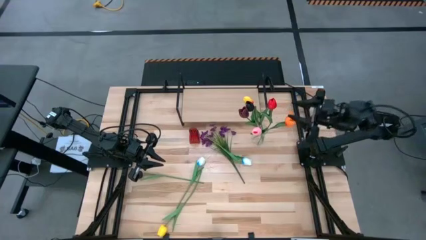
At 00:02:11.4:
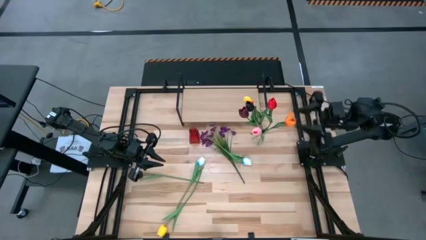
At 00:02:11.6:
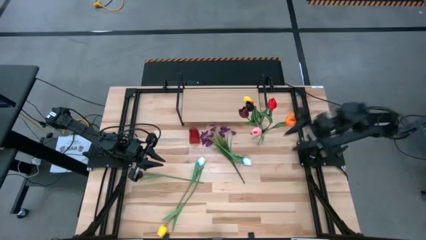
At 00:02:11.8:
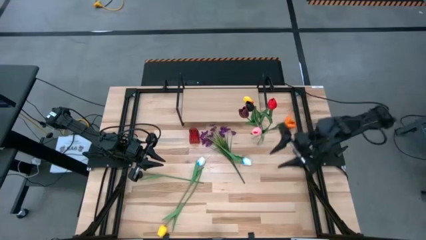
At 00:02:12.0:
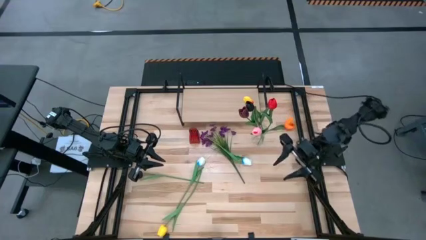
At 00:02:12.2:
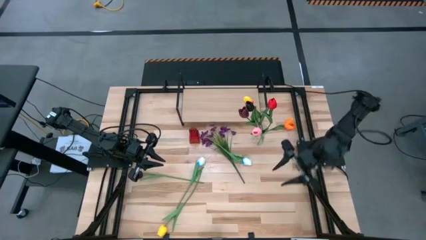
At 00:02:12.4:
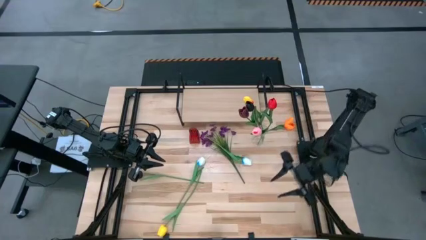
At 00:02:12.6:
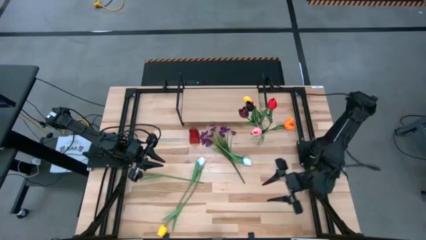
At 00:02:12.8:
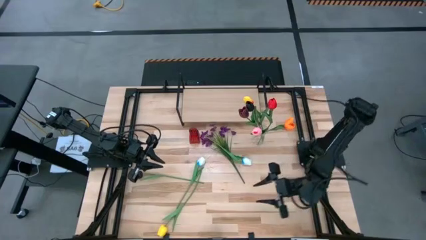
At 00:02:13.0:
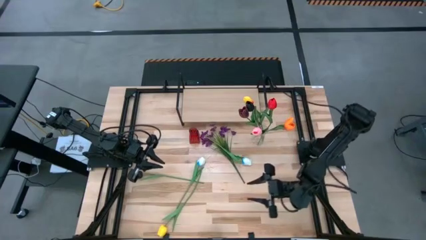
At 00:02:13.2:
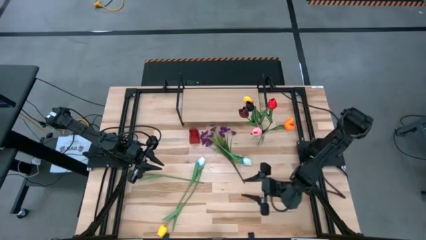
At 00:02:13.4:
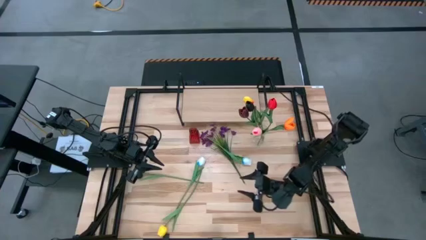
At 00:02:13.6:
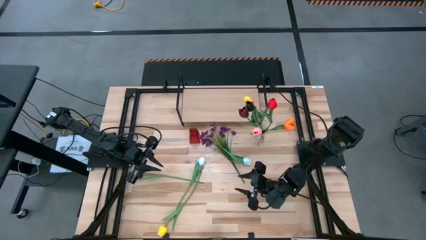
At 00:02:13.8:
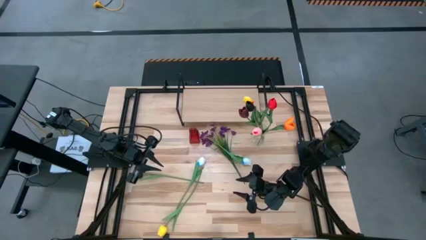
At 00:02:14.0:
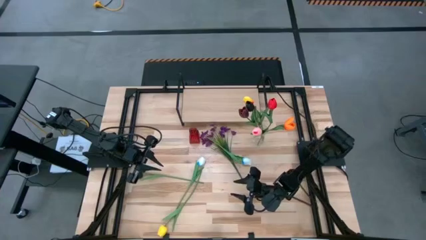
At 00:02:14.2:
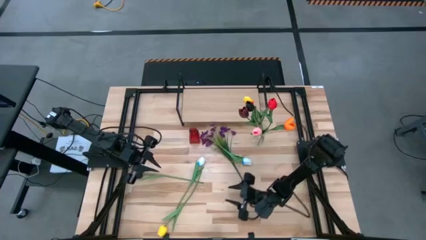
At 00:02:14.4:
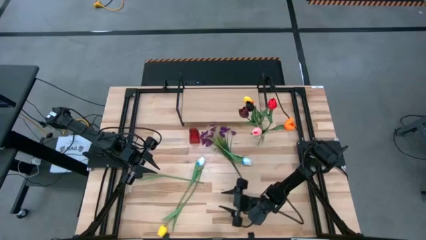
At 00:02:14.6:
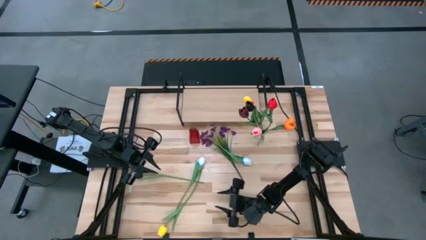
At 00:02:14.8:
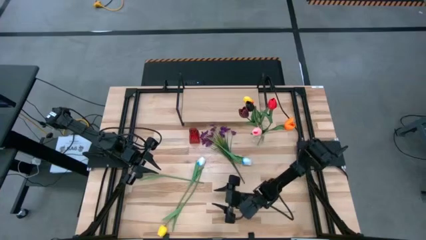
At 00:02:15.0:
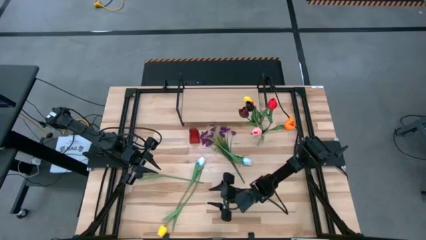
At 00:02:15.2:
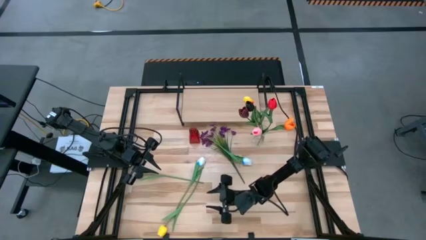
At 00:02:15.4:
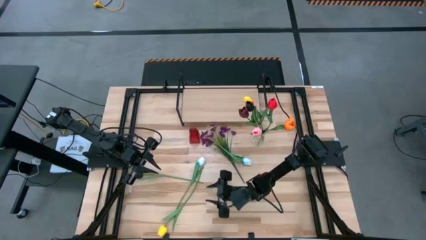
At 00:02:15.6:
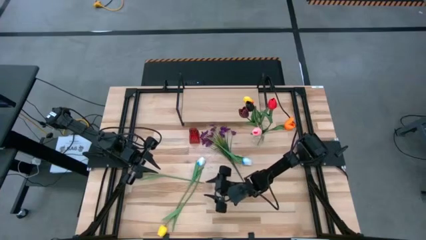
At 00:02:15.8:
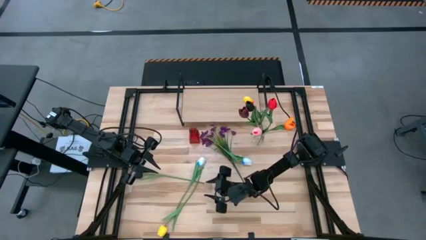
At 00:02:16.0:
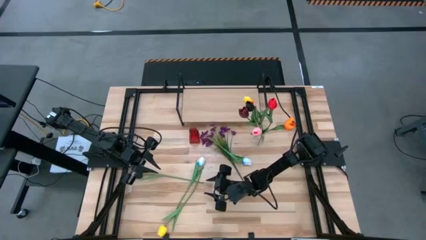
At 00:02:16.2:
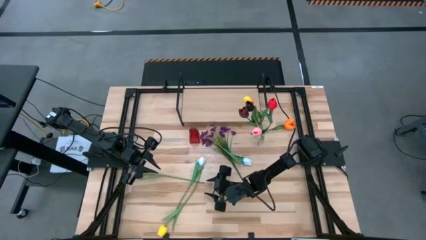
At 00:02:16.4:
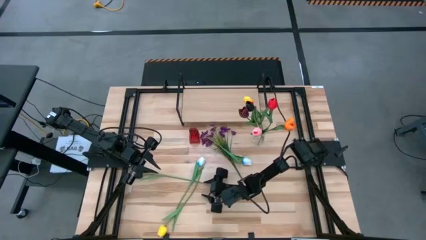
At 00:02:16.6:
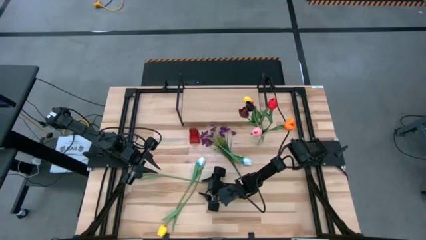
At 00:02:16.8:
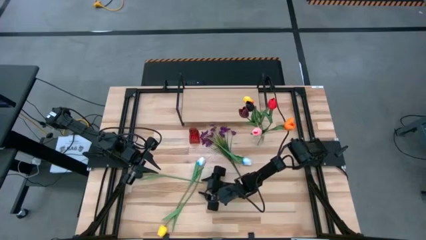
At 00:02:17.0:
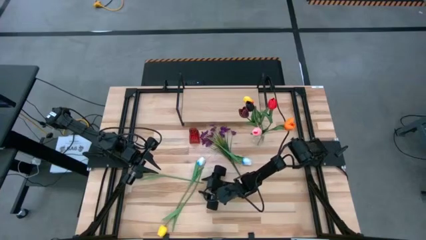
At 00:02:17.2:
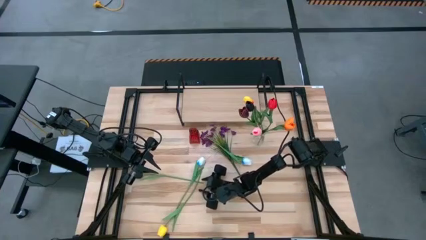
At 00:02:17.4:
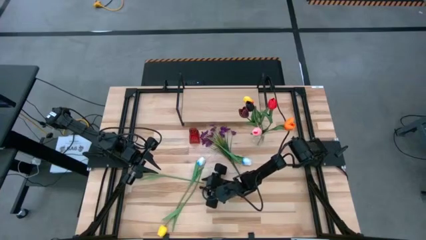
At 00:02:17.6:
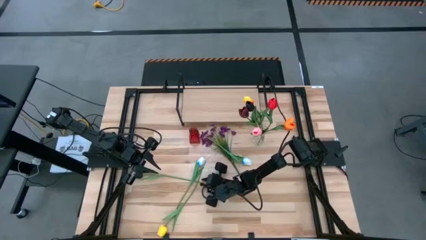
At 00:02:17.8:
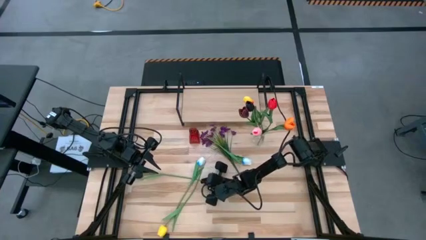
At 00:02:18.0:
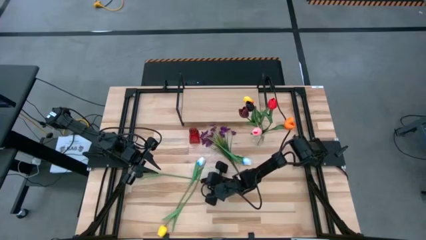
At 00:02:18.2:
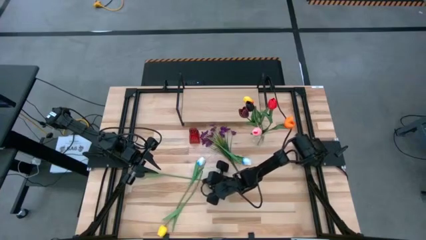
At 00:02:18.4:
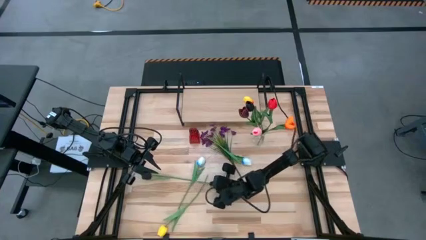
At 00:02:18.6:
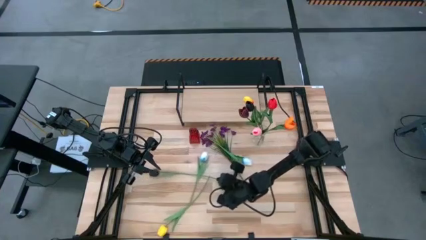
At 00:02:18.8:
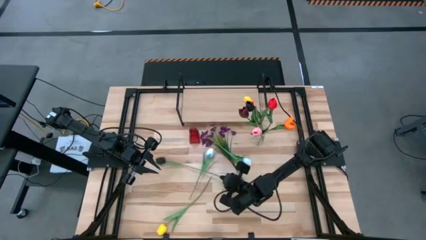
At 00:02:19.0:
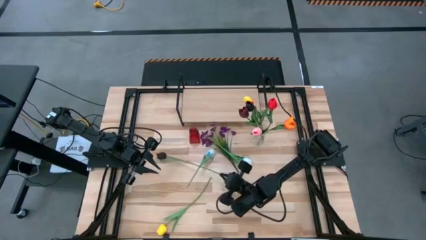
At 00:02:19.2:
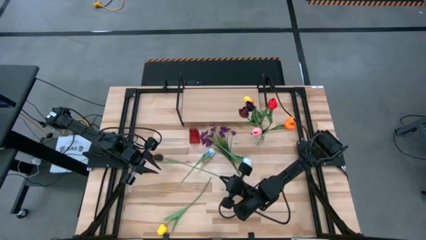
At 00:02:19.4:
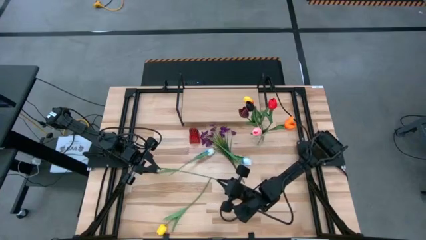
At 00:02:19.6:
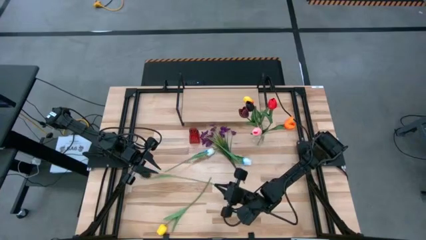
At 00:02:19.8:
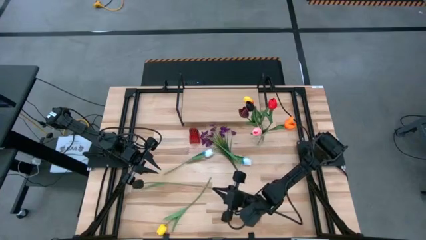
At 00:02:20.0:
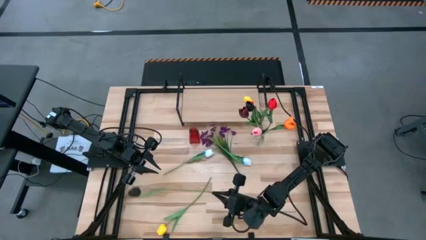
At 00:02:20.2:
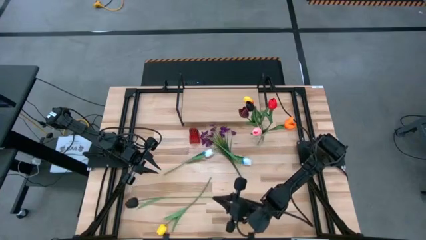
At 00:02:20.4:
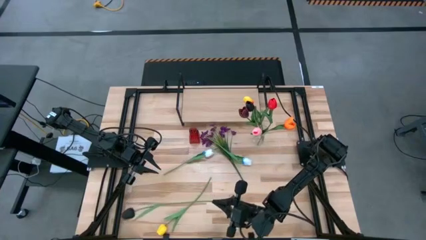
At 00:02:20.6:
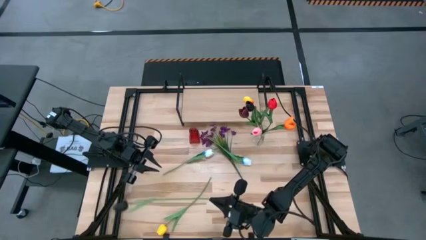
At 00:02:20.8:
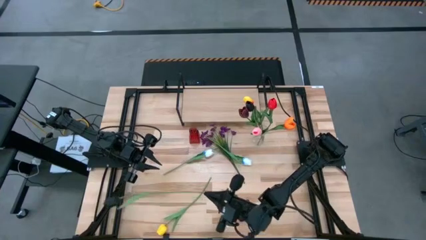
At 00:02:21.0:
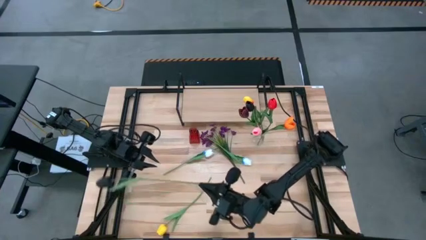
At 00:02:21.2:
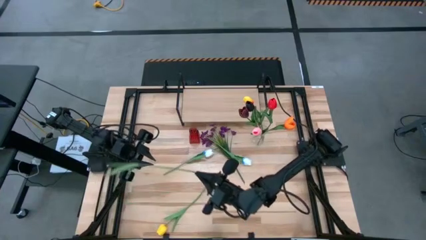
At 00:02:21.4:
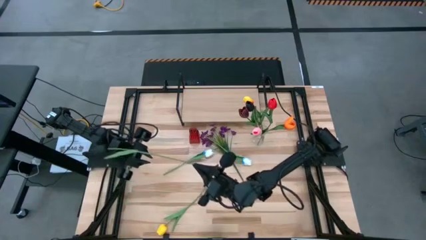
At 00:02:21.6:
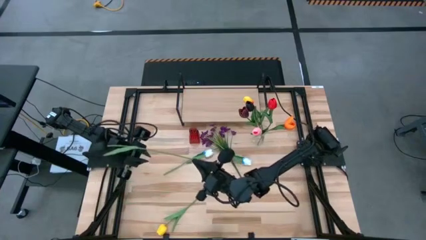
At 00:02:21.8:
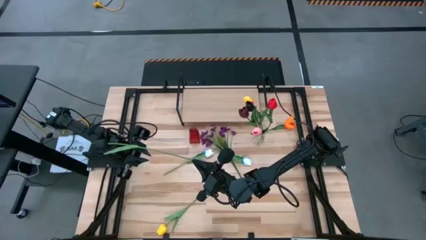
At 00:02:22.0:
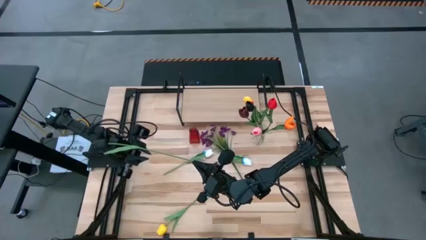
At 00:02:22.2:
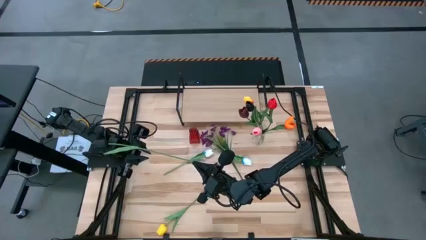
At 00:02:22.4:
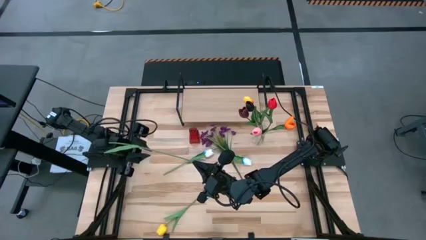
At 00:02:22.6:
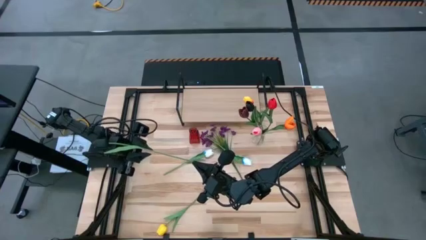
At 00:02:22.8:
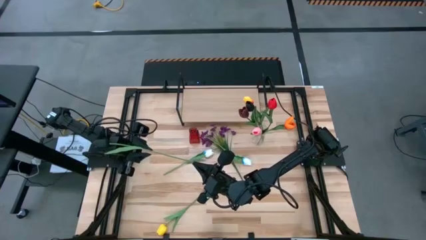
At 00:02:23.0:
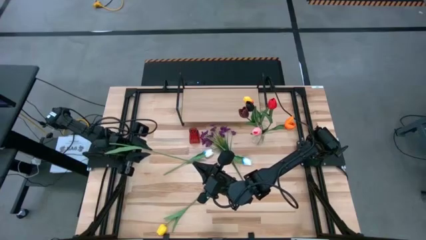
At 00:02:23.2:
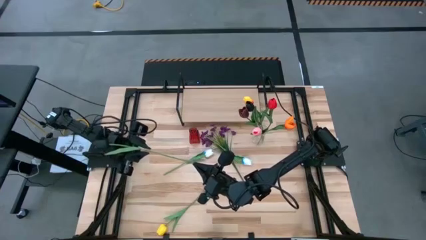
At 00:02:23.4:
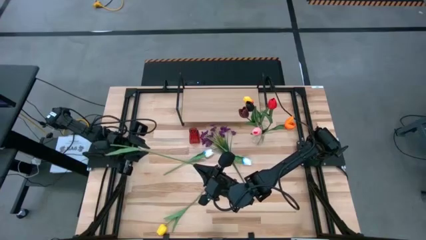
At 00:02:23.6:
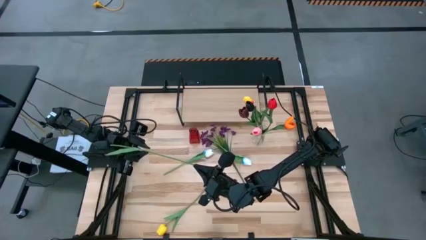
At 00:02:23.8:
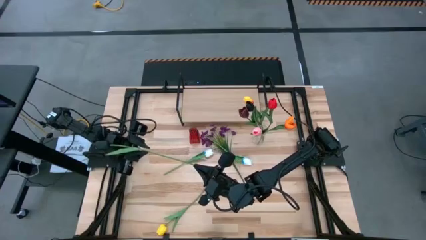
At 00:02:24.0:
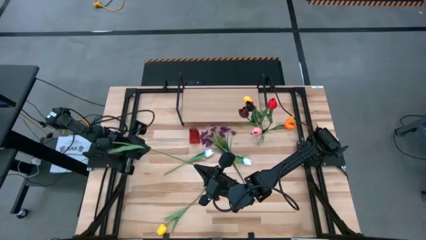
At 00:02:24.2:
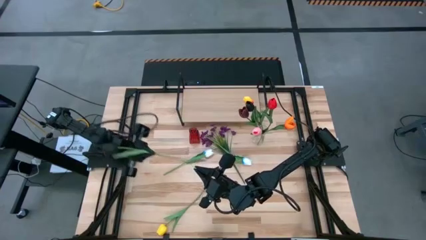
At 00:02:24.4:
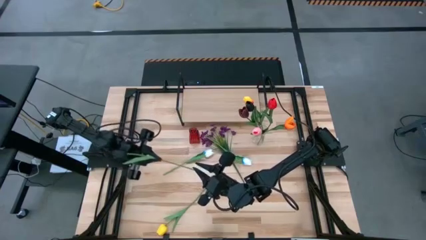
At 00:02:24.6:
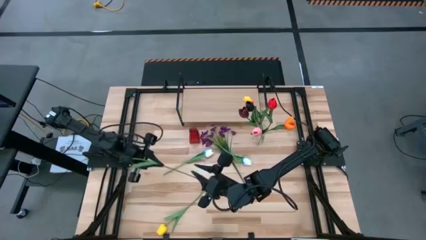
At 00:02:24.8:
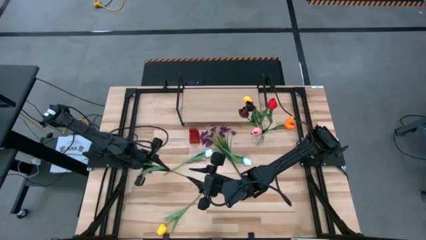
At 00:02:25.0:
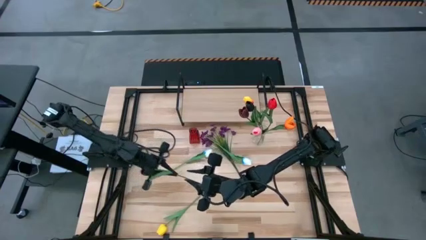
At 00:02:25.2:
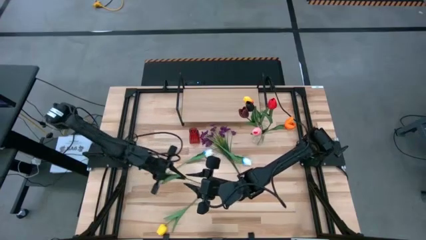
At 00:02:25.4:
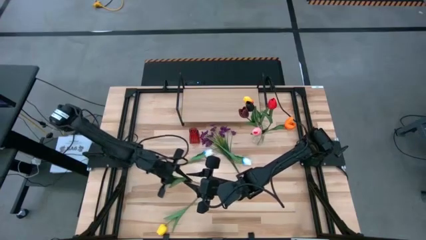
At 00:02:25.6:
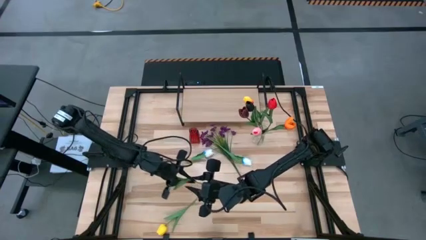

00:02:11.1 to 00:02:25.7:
Task: Pick and place flowers into a vace then onto a shelf
Put the black flower into the transparent vase
